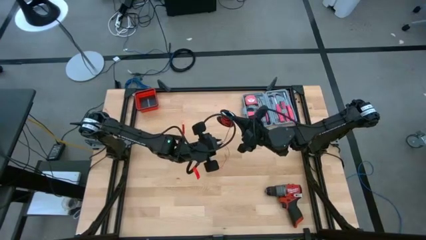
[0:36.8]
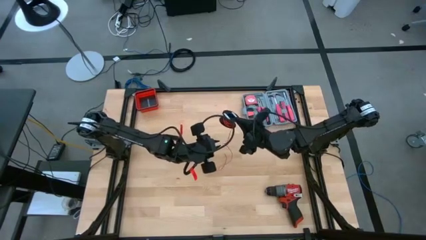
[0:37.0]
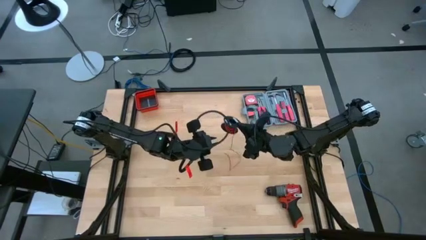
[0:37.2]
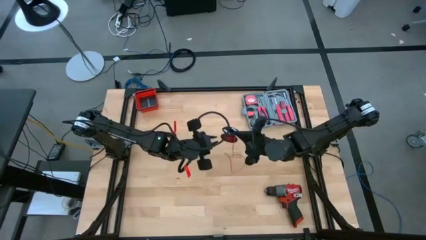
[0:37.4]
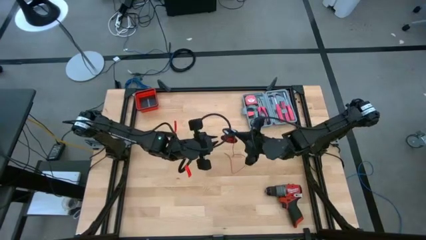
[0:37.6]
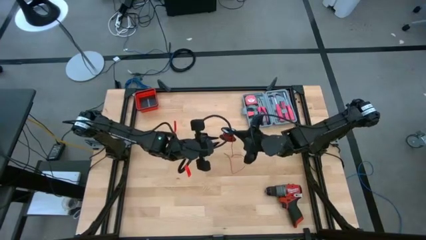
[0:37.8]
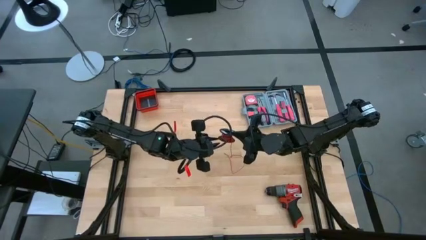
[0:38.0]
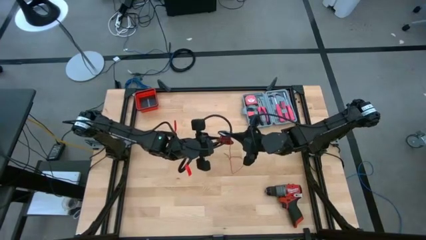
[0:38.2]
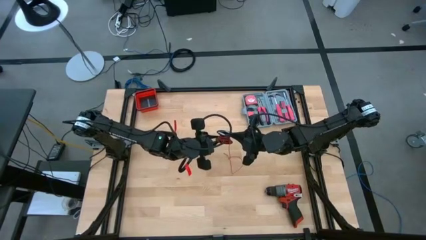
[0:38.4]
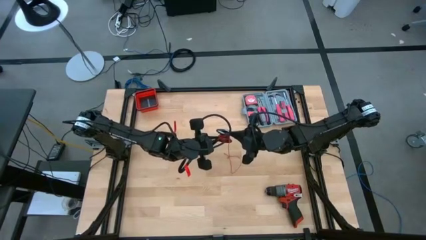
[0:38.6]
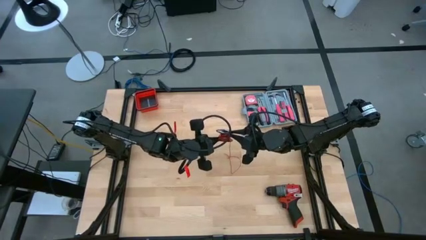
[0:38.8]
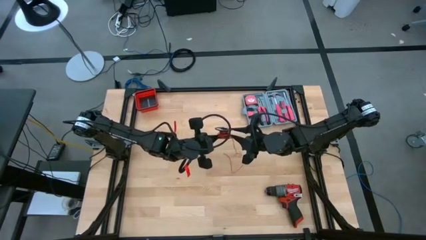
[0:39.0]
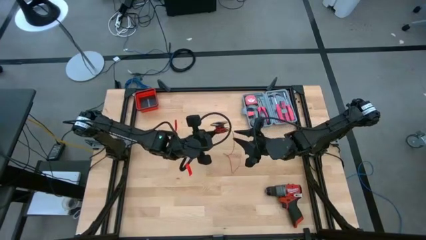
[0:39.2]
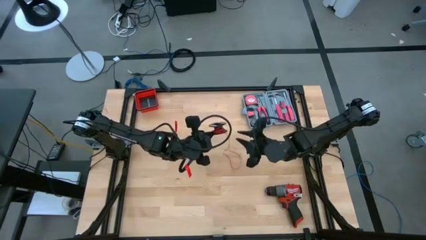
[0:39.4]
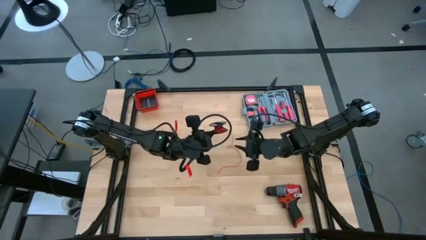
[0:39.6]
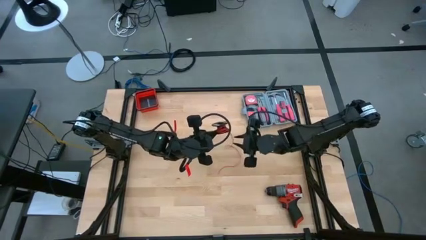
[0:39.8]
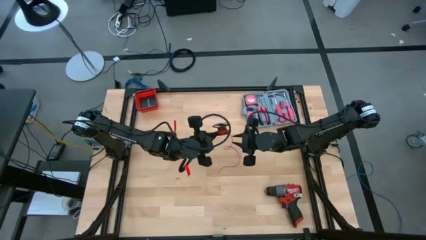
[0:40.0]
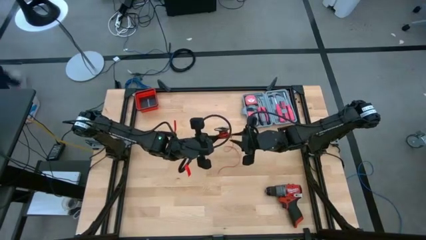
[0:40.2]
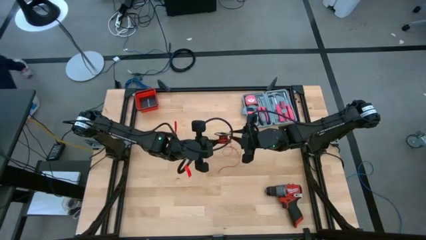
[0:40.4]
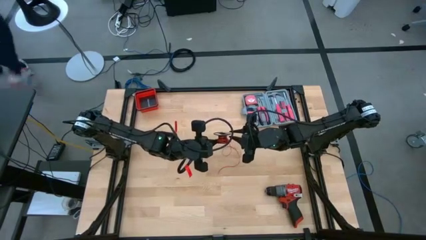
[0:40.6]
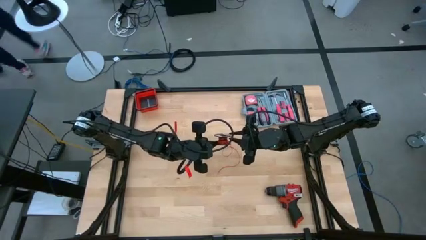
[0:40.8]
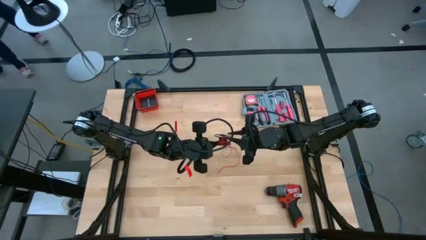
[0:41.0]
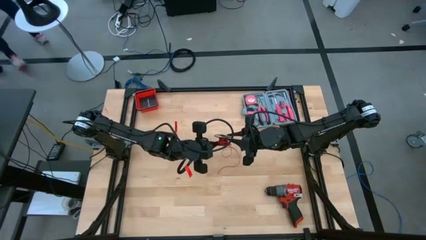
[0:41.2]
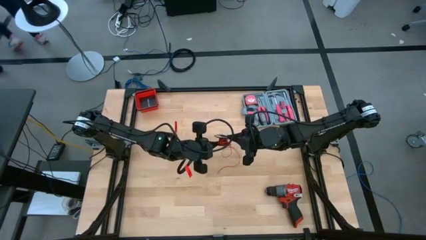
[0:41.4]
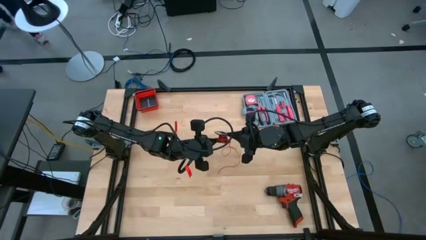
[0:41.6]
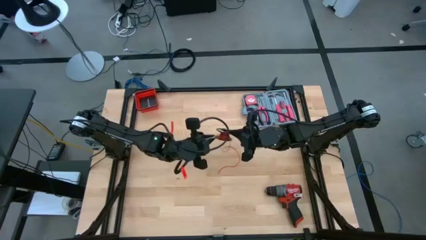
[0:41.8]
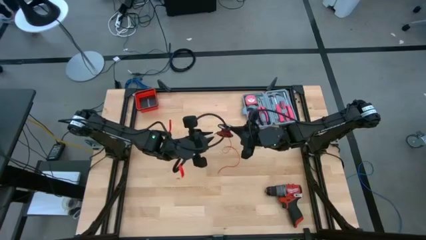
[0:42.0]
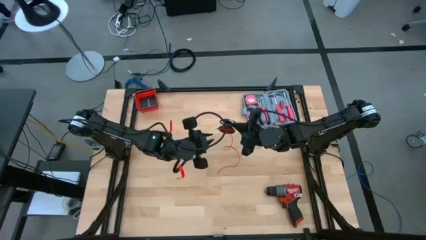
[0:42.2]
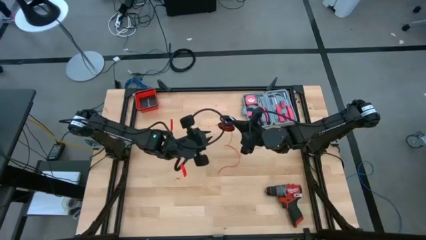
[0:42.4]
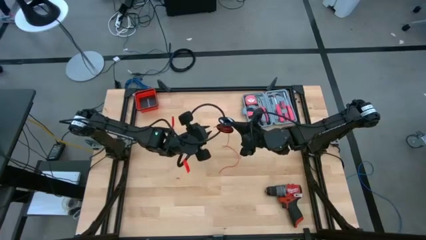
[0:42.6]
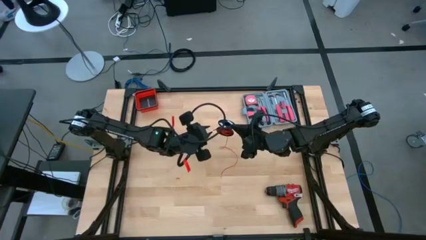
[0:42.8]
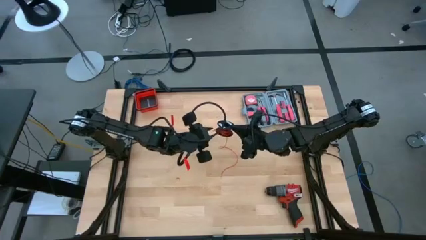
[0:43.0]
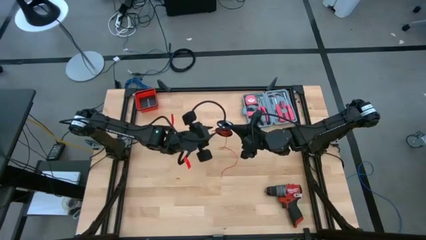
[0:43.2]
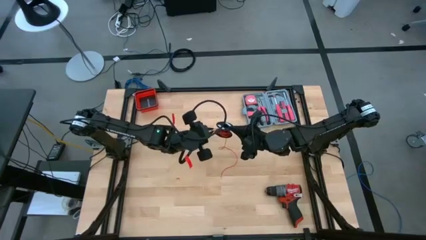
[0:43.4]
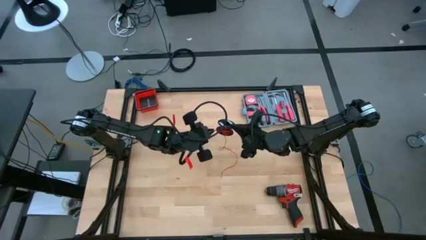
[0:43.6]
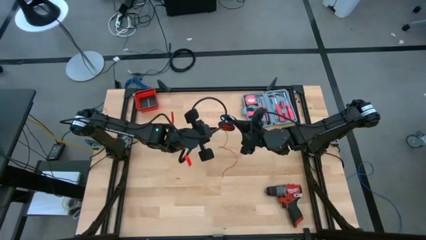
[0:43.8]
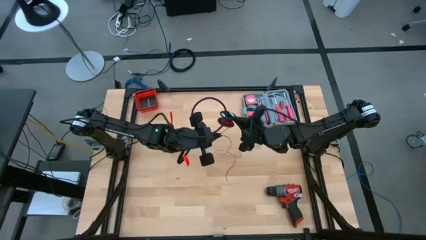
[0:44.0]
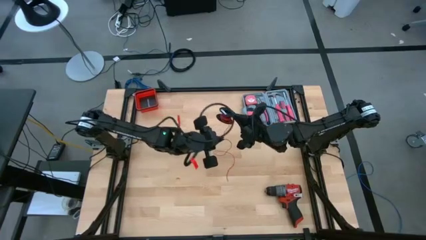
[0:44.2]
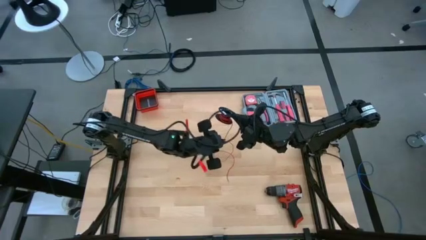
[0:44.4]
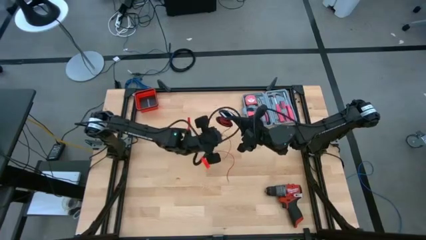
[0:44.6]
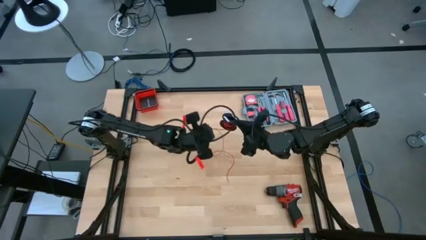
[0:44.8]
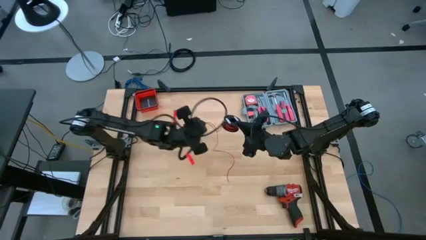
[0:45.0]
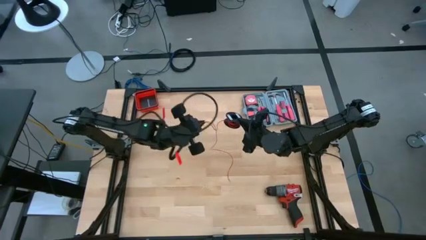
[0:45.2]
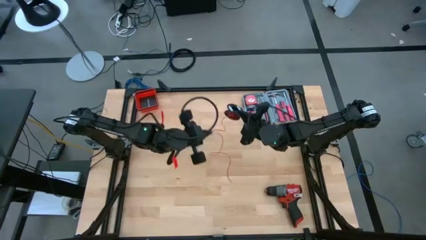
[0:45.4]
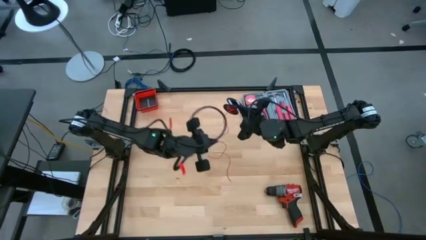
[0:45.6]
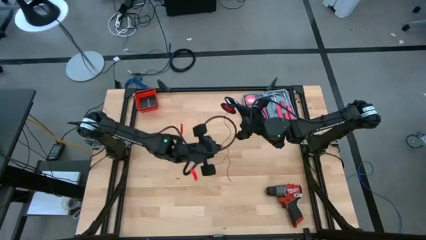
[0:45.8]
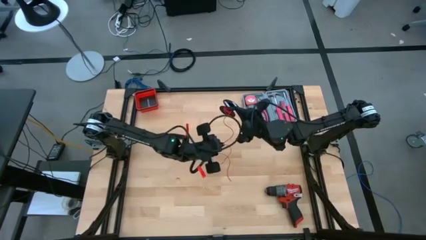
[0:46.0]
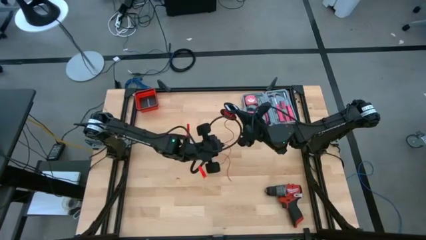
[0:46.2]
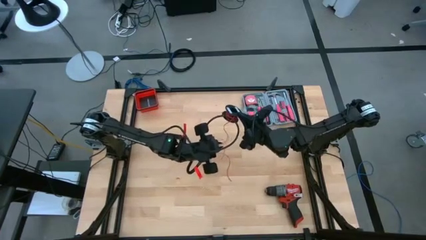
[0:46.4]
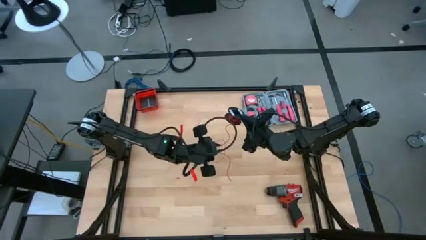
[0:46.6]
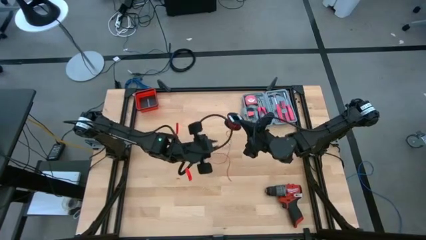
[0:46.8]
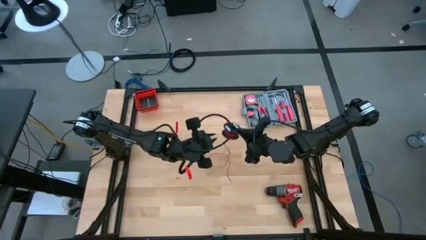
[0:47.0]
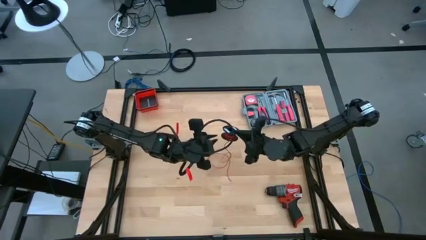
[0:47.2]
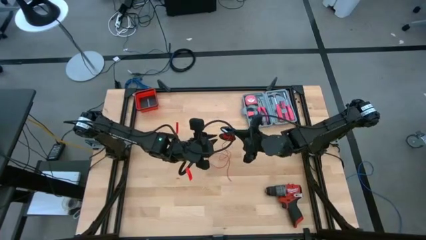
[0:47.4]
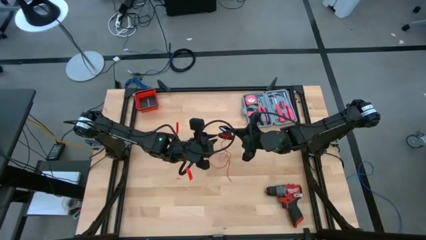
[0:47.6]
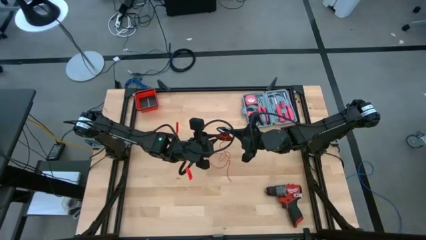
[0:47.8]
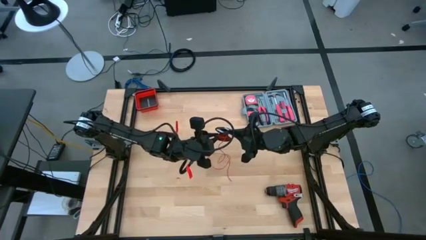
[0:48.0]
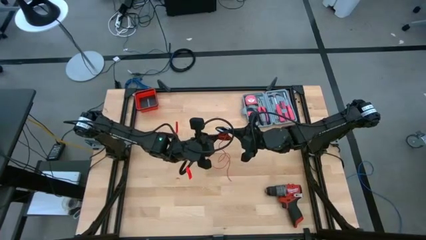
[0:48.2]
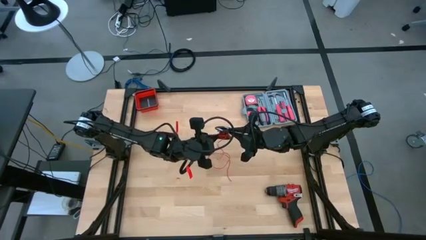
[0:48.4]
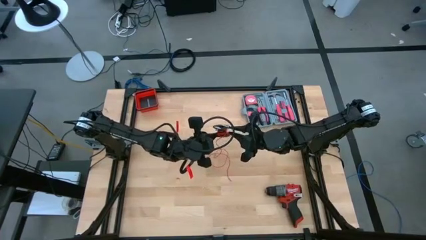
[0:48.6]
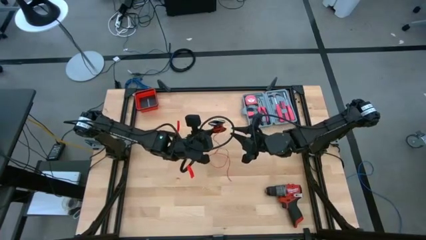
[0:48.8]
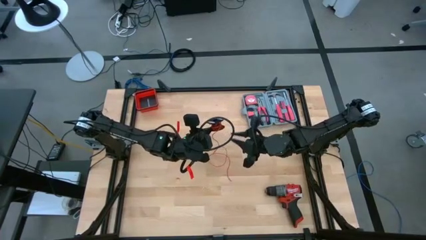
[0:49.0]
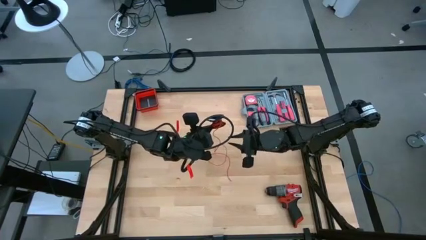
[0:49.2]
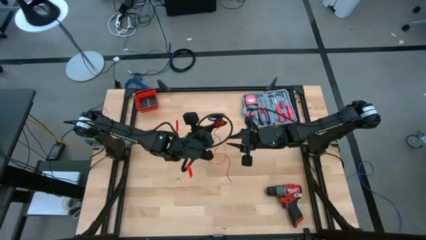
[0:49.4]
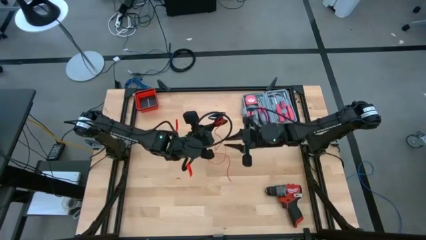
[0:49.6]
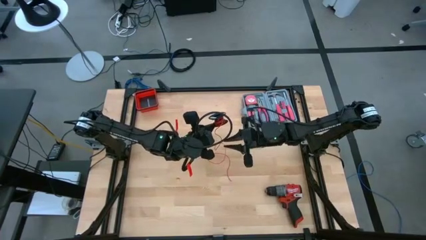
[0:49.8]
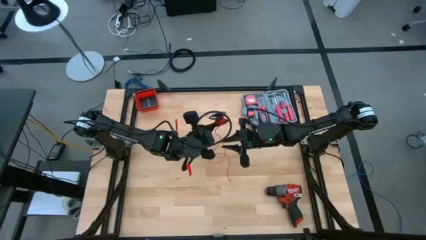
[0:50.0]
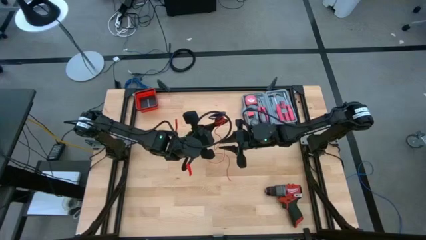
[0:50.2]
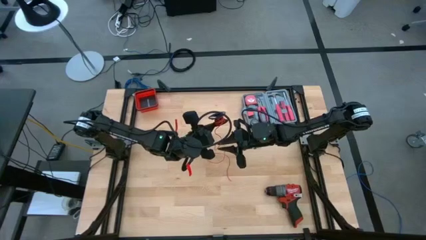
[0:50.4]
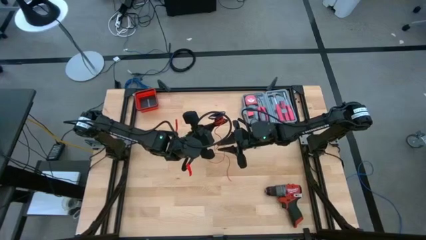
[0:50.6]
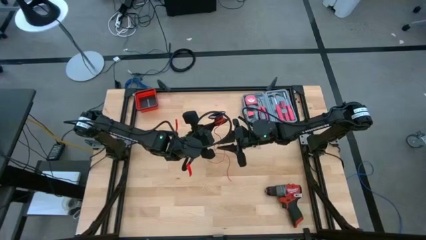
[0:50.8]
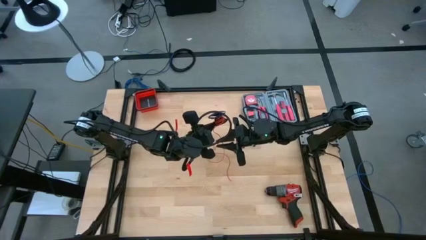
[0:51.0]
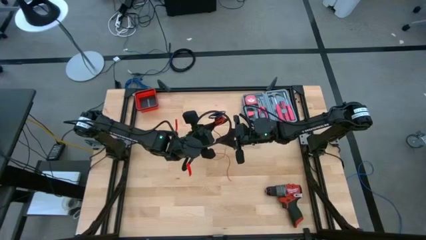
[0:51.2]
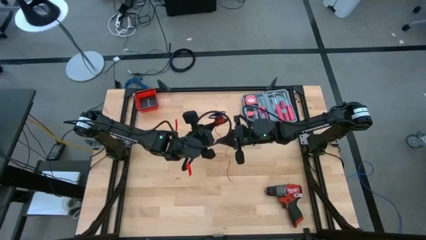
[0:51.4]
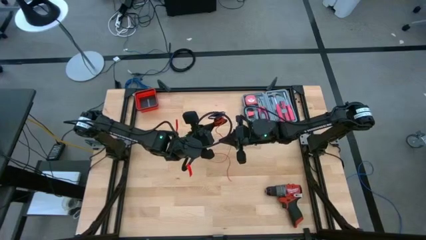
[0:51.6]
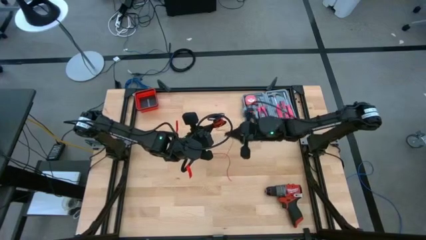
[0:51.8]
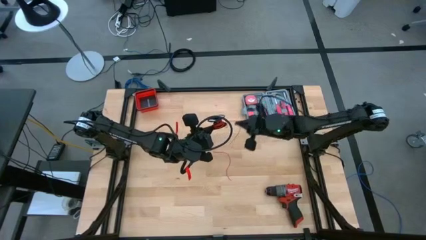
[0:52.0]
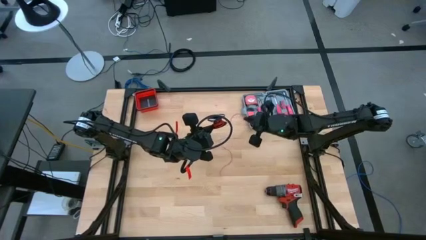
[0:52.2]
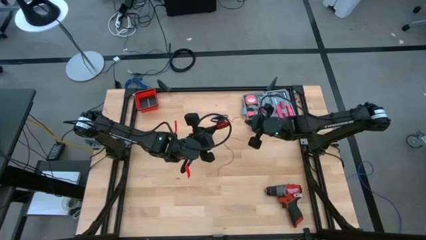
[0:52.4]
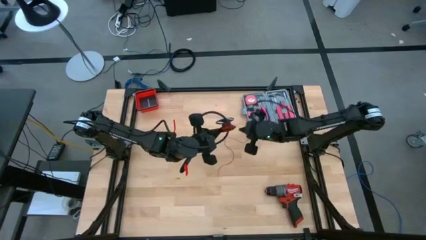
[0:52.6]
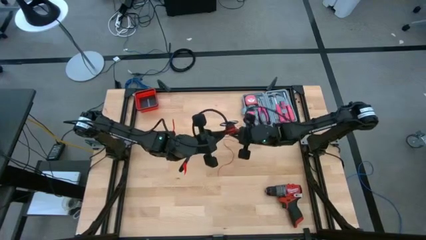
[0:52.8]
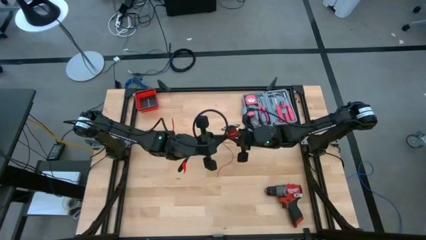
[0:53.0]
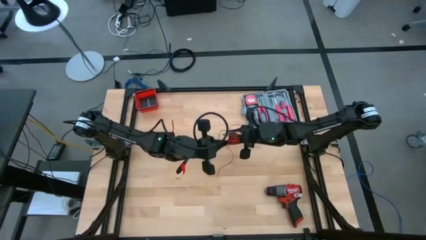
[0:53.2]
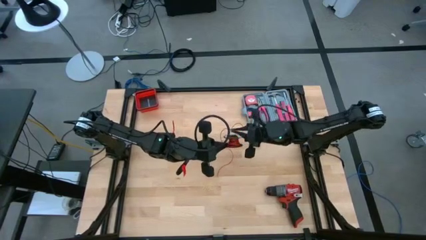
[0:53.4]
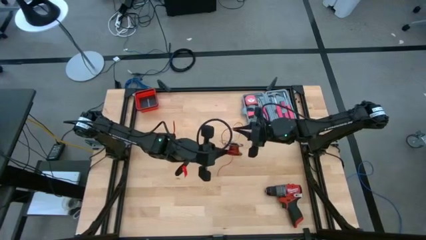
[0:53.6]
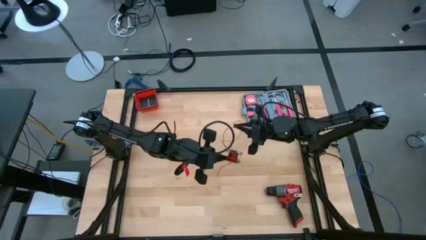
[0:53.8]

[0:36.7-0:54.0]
Task: Coil cords
Uncoil the red wire from the black spool
